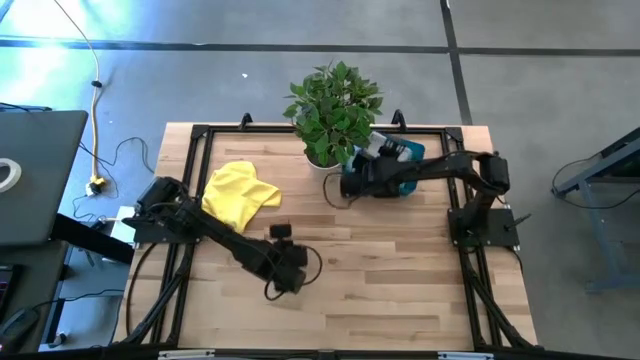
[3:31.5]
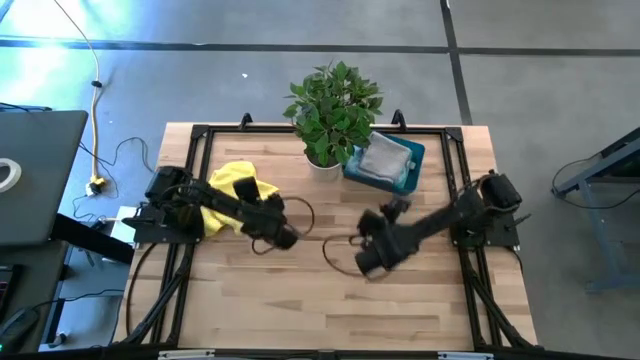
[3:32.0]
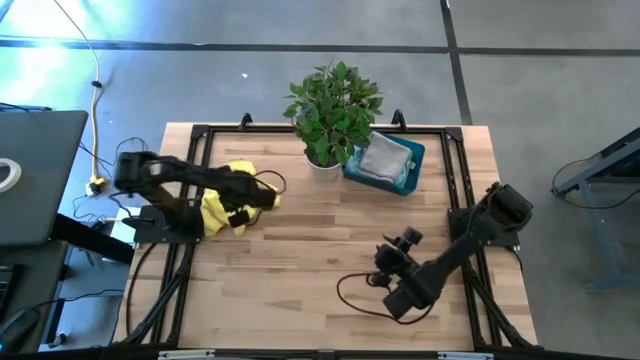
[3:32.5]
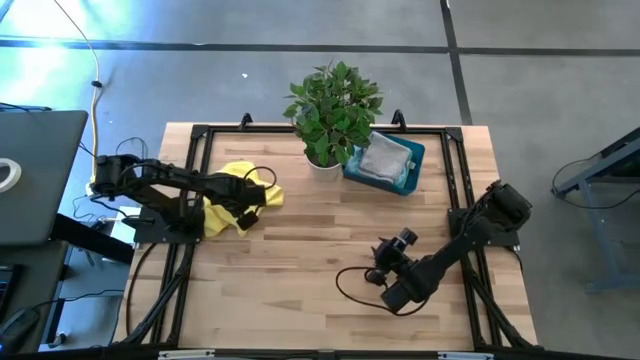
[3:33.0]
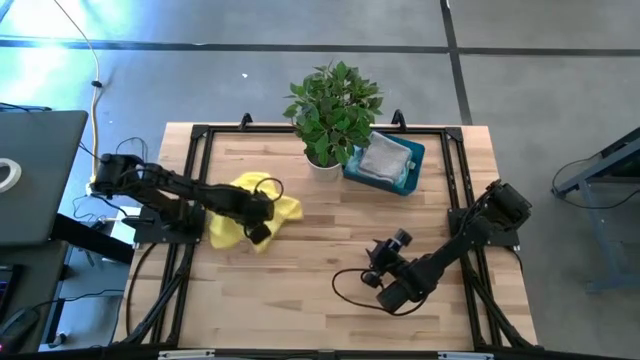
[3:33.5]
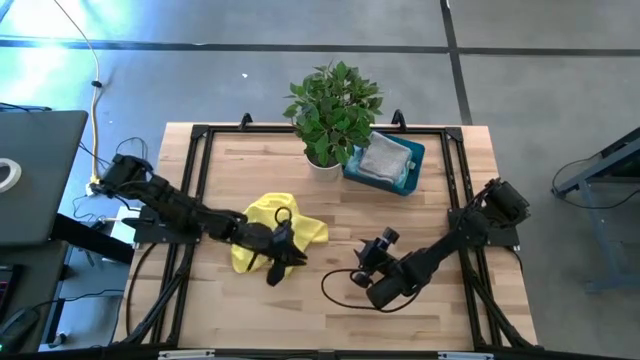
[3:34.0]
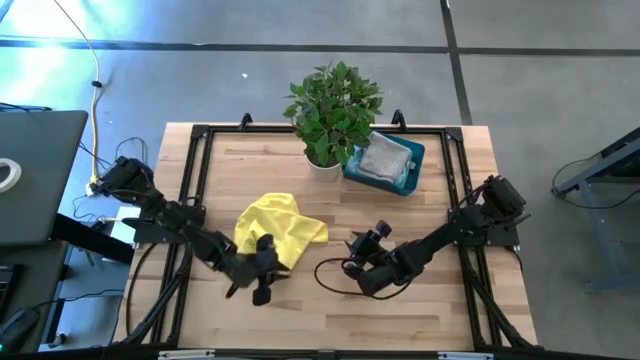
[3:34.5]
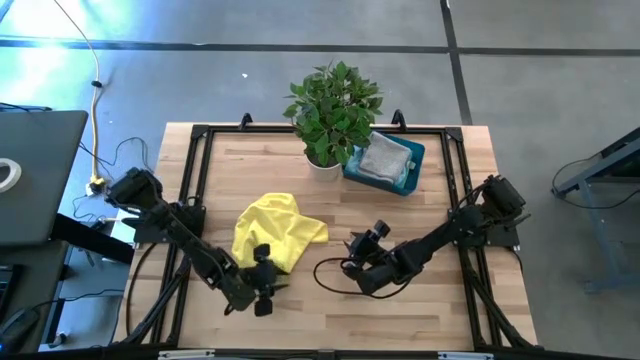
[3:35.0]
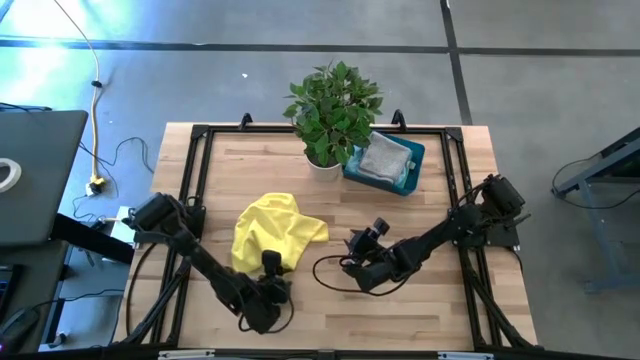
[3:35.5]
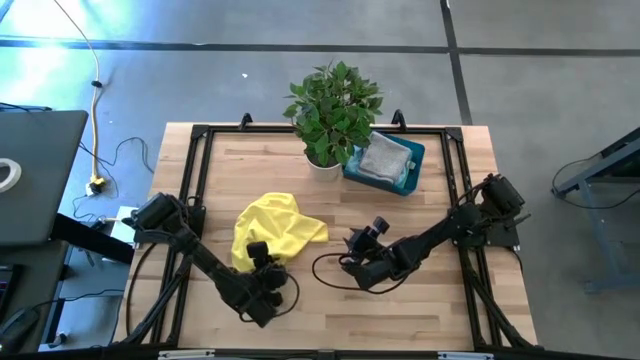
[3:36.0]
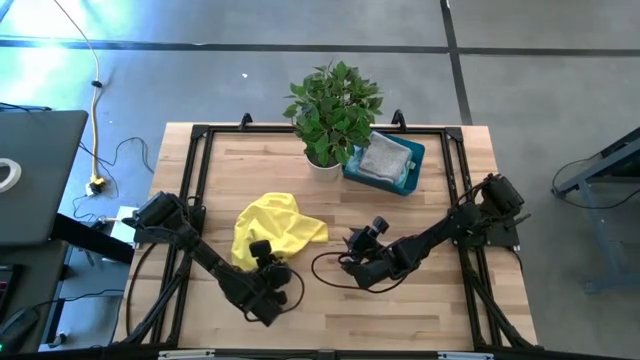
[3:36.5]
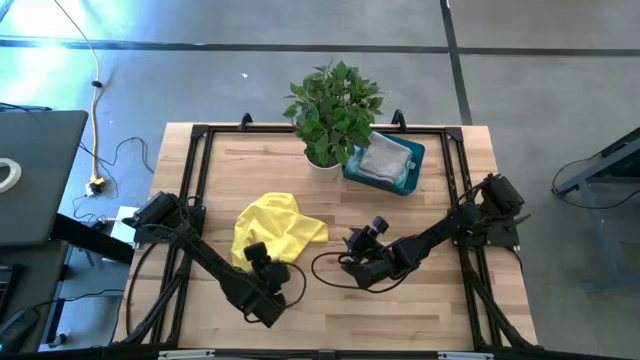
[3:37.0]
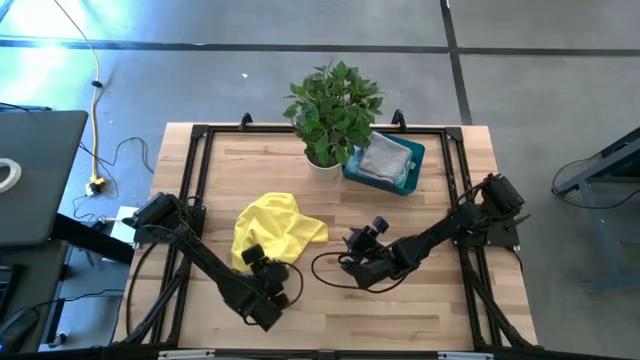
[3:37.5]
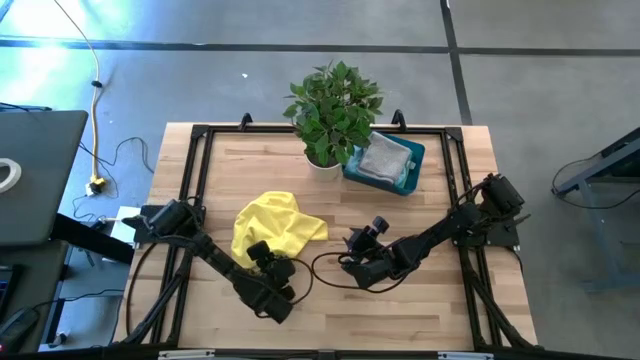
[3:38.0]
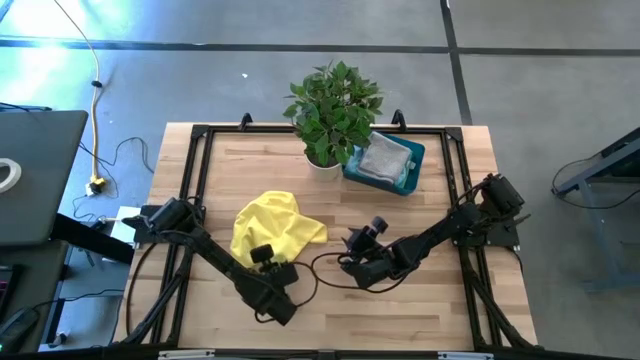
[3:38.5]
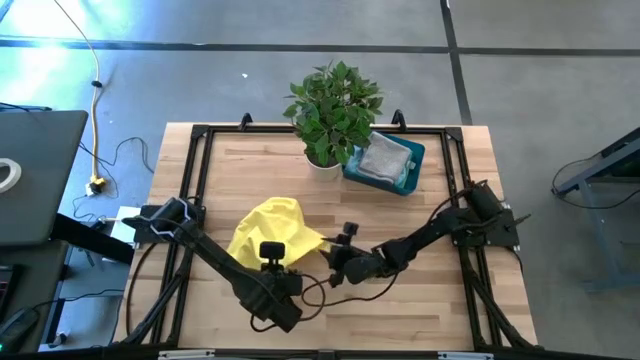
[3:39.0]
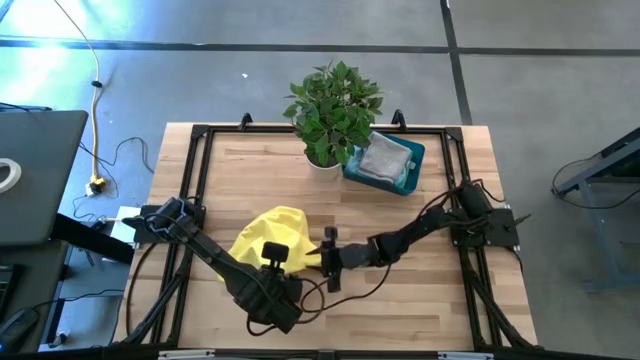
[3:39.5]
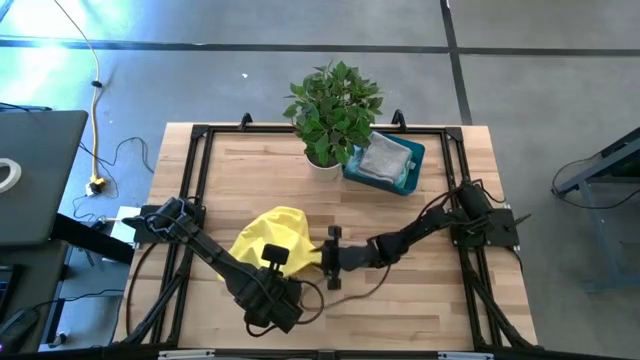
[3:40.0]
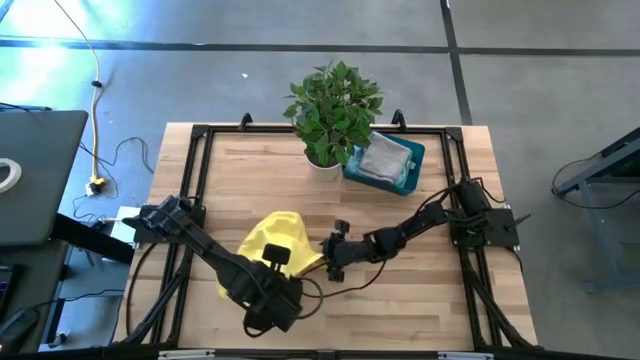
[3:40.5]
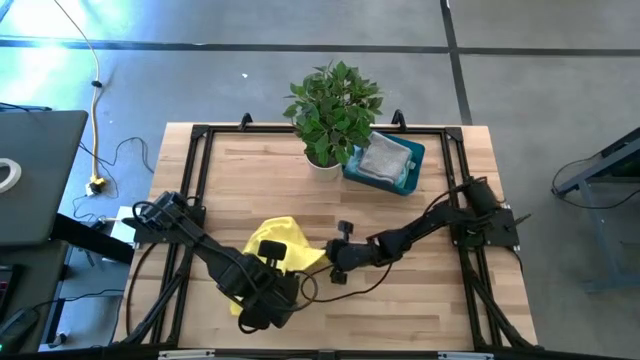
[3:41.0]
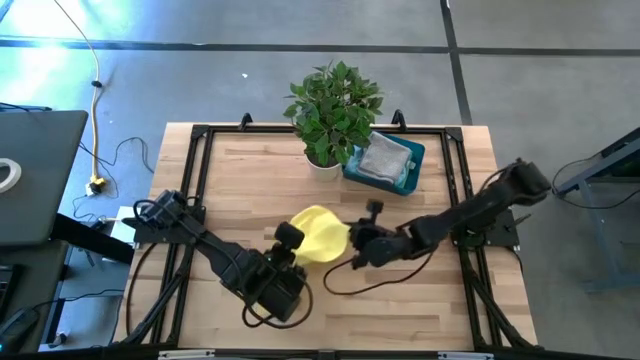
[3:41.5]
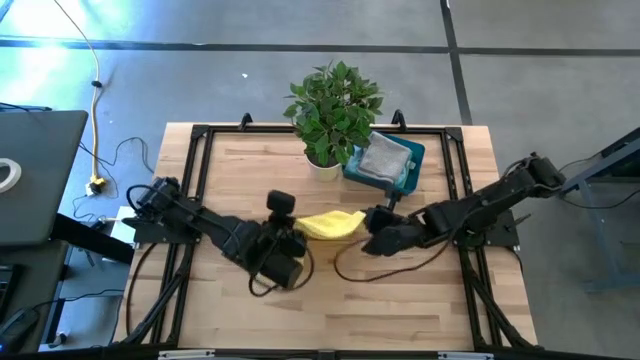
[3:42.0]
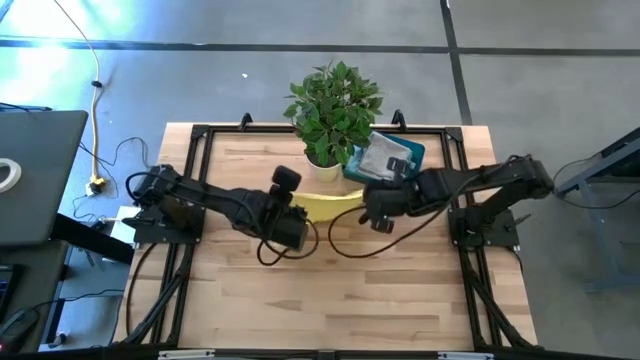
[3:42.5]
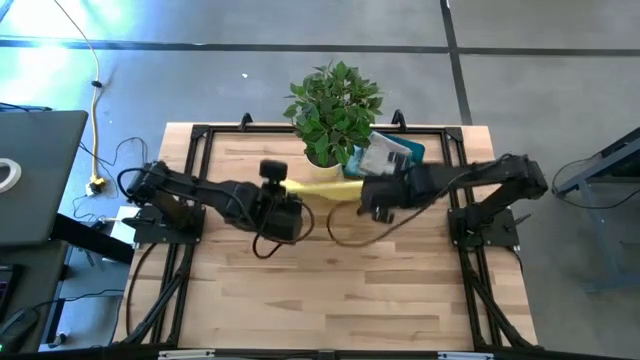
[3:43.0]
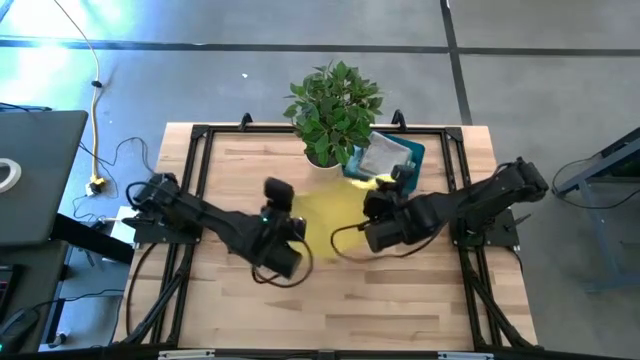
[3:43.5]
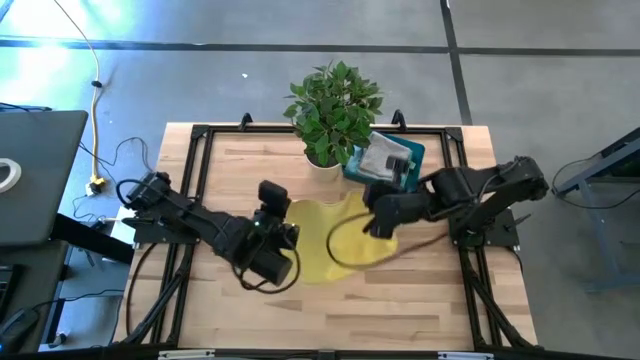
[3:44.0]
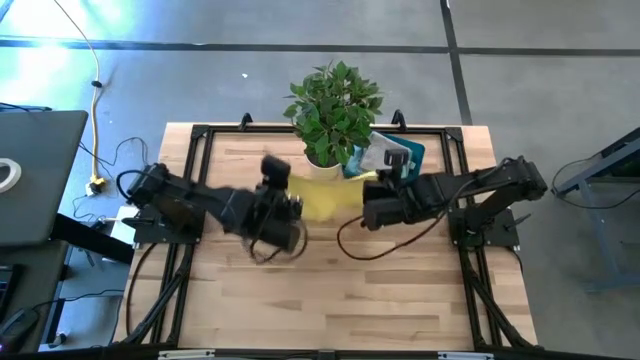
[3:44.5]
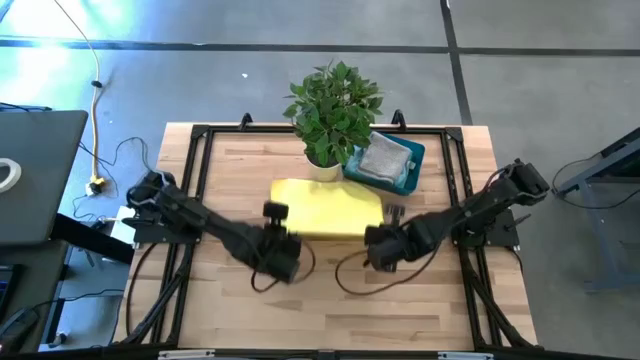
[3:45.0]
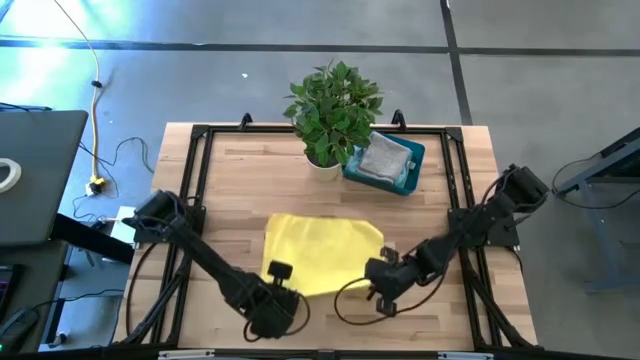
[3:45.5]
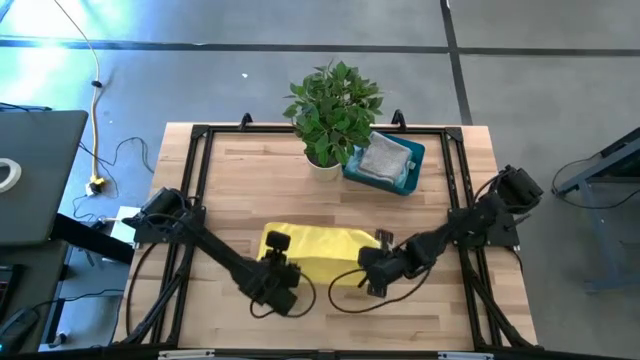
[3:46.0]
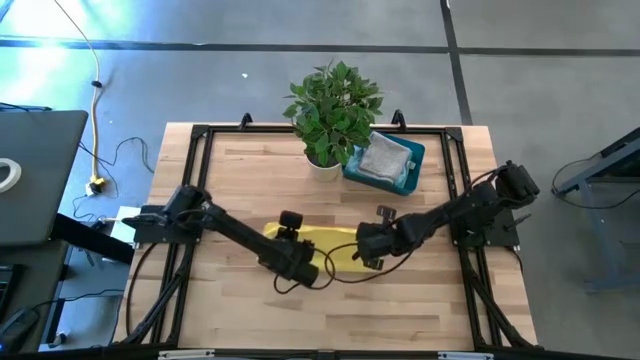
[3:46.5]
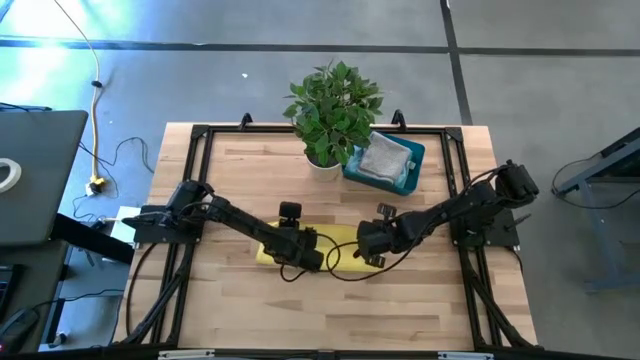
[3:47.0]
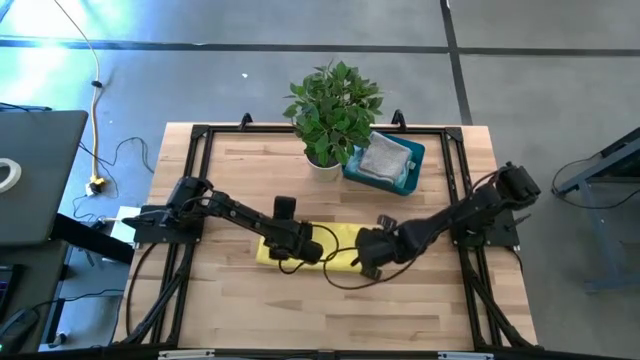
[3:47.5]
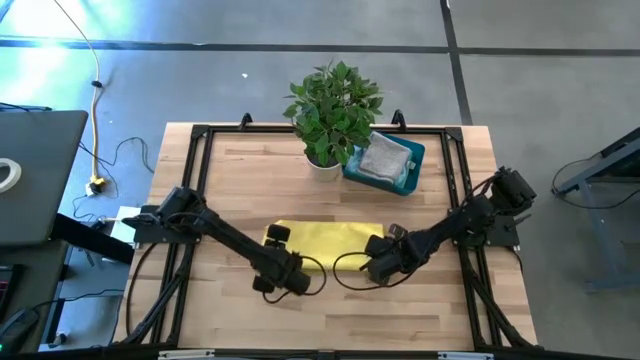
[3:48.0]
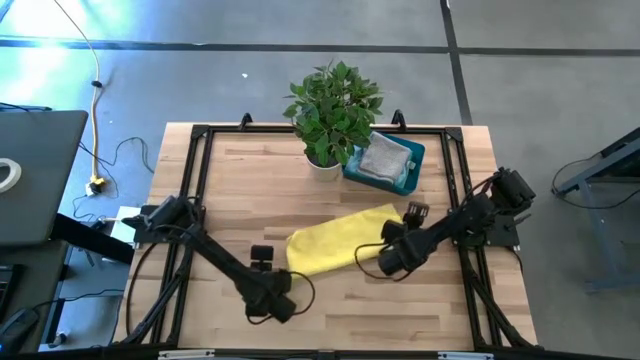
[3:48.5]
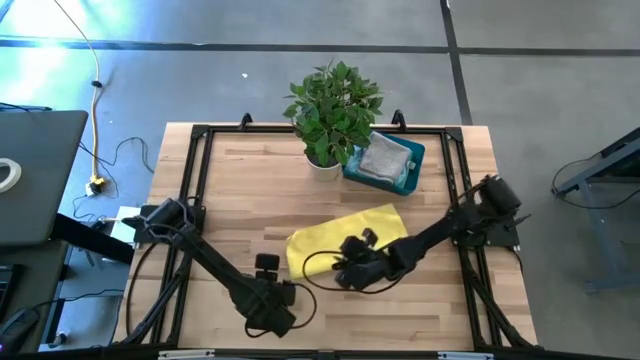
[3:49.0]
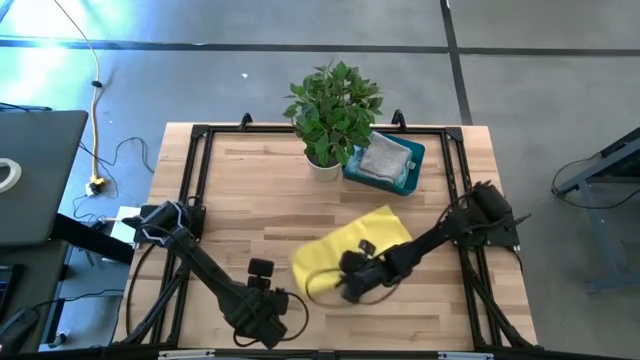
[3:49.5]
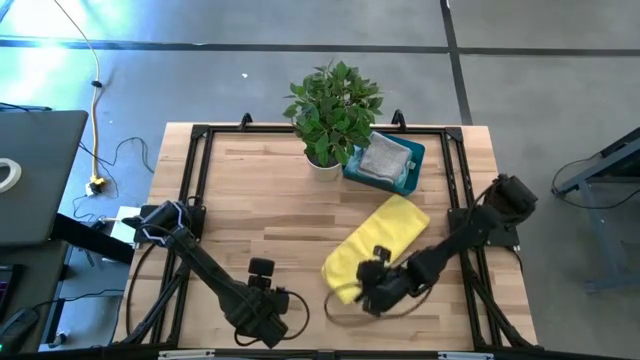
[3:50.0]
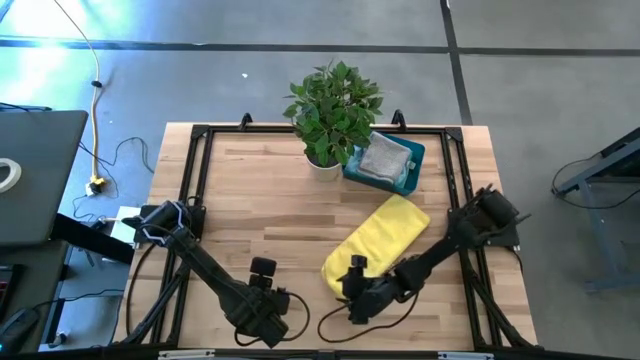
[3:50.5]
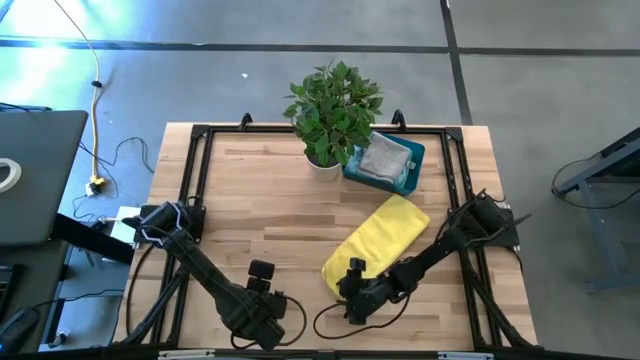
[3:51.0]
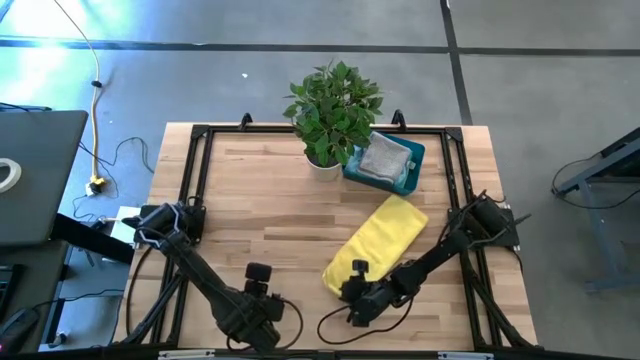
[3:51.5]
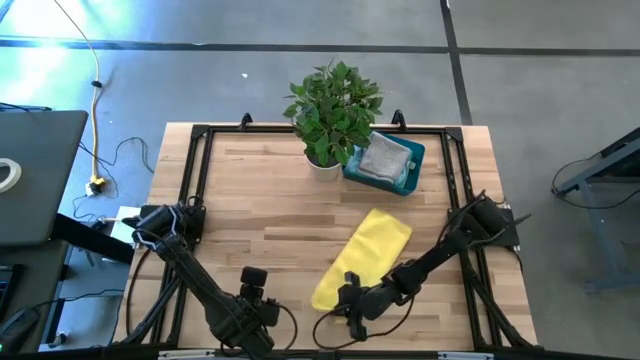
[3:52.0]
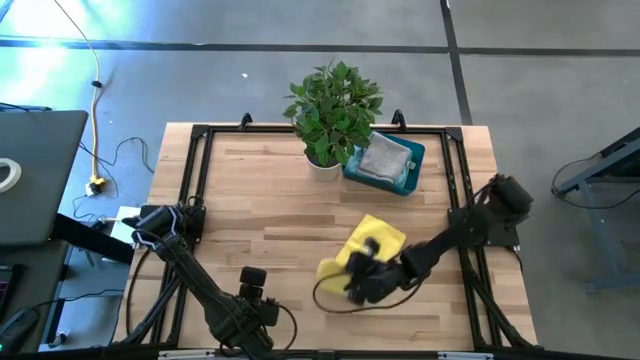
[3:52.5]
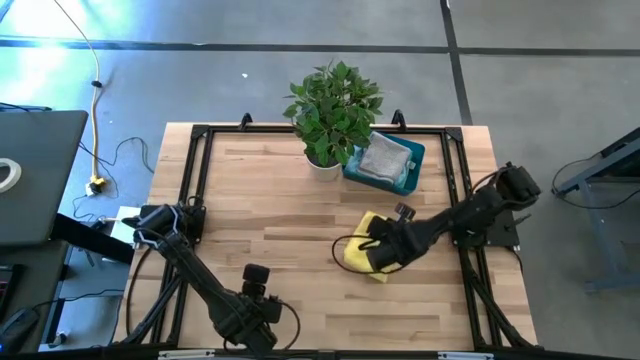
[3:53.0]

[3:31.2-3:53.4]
Task: Fold microfiber towels
Fold the yellow towel
